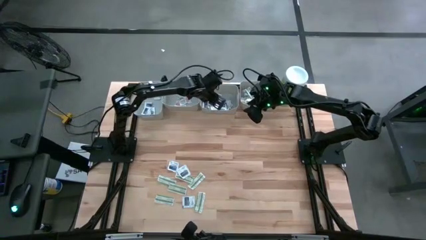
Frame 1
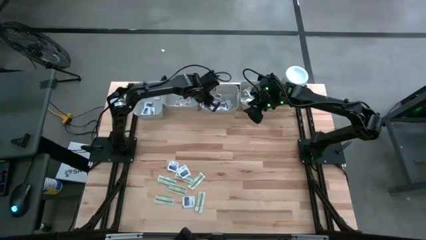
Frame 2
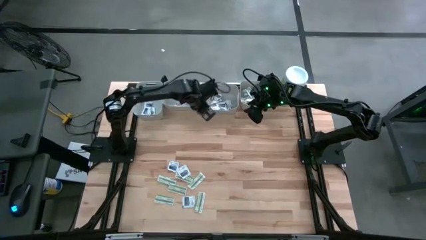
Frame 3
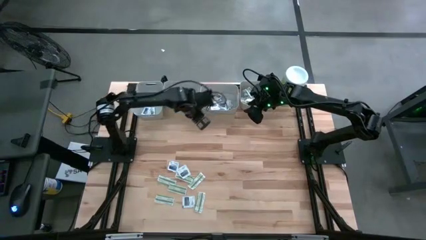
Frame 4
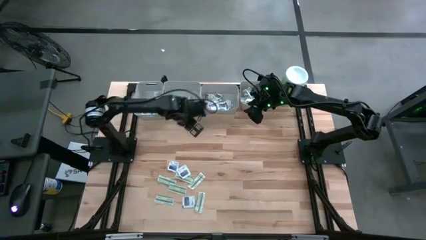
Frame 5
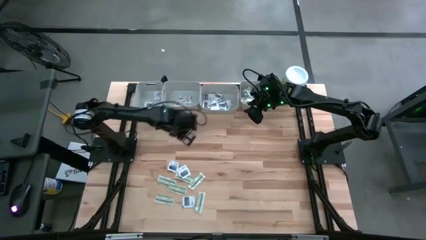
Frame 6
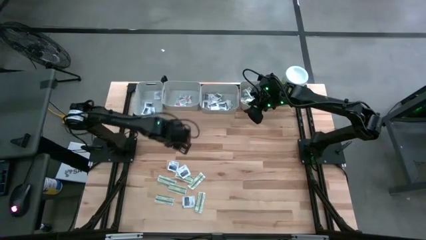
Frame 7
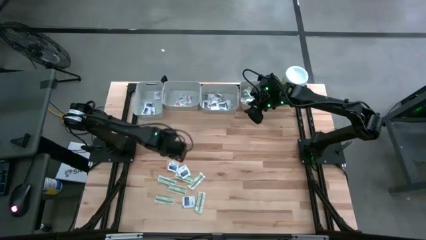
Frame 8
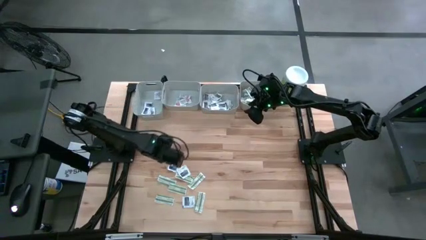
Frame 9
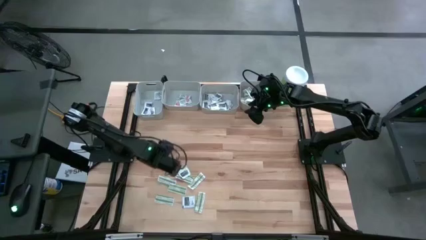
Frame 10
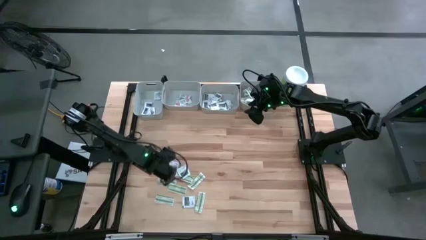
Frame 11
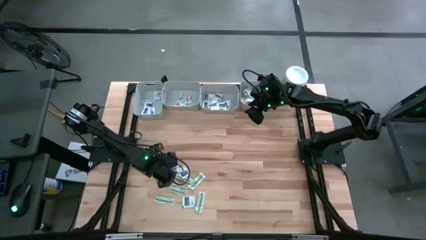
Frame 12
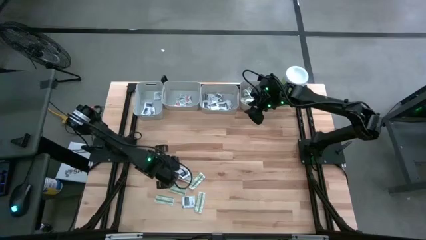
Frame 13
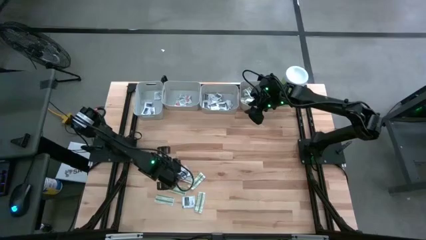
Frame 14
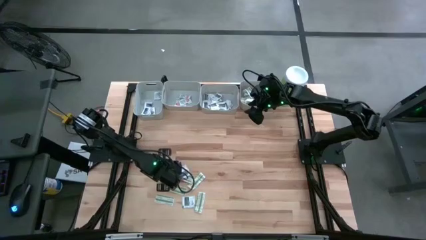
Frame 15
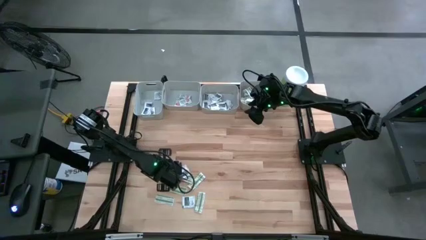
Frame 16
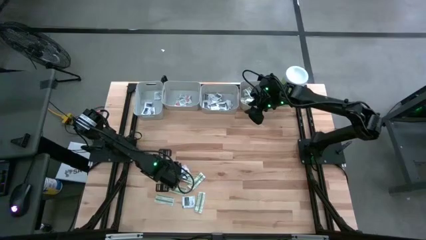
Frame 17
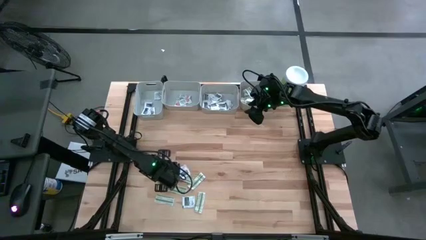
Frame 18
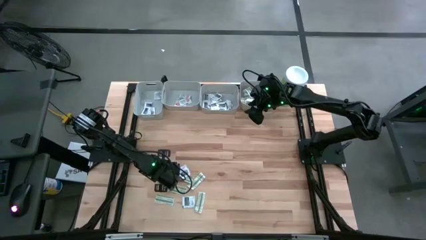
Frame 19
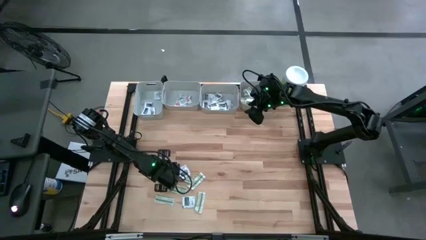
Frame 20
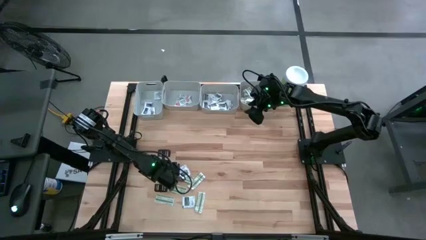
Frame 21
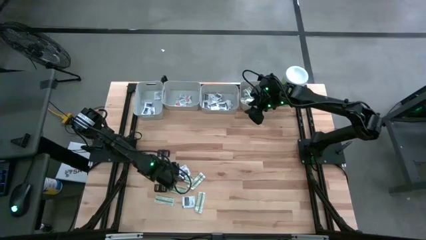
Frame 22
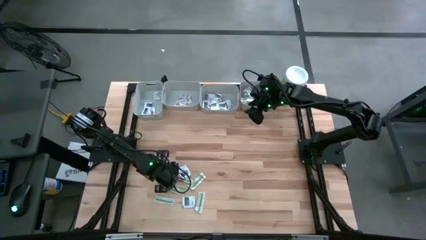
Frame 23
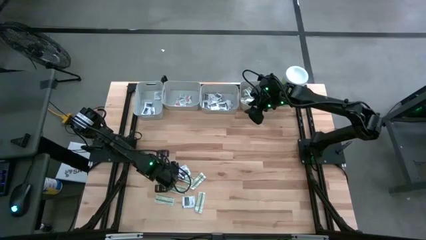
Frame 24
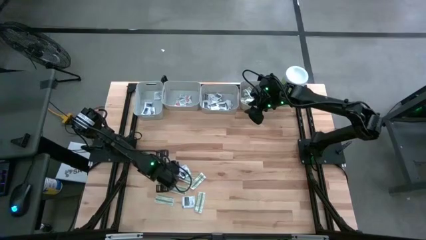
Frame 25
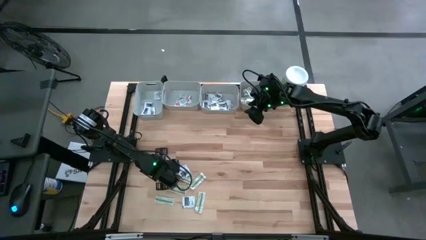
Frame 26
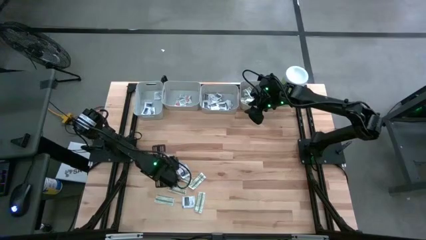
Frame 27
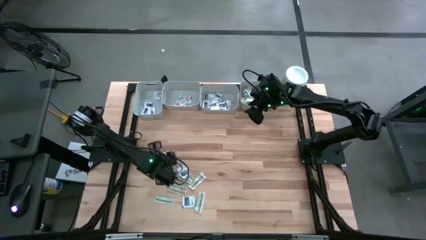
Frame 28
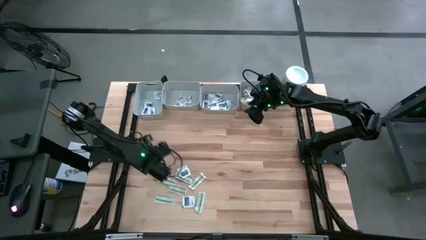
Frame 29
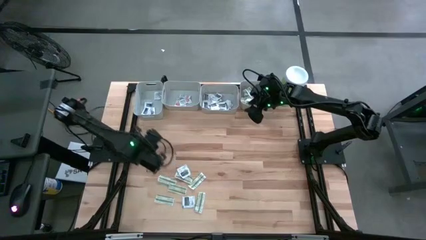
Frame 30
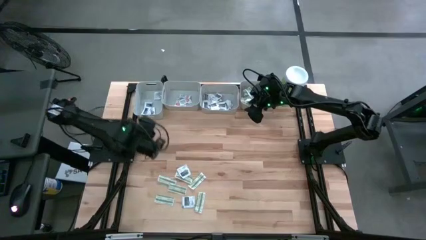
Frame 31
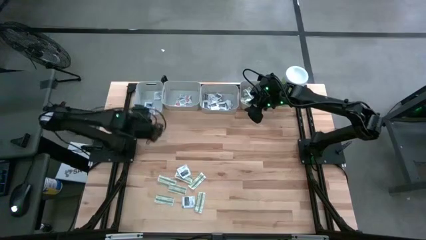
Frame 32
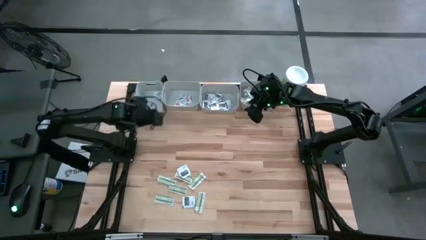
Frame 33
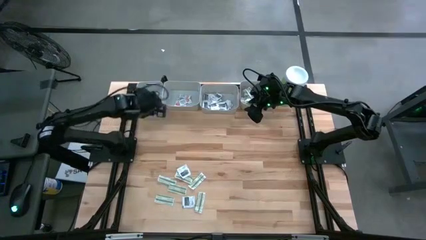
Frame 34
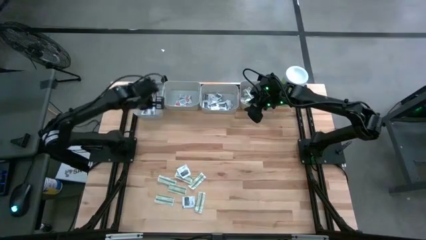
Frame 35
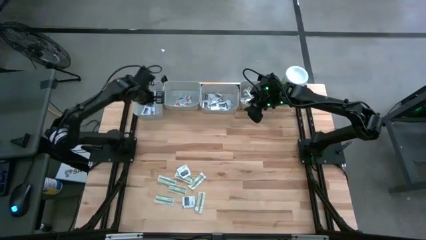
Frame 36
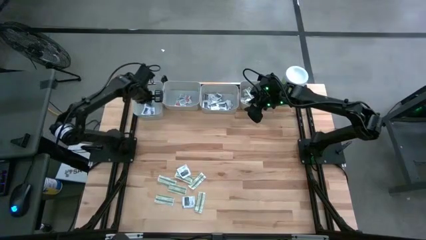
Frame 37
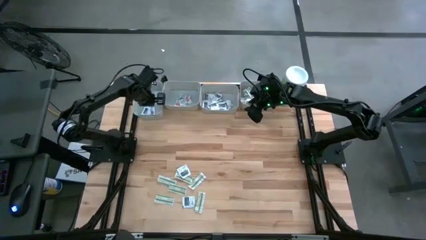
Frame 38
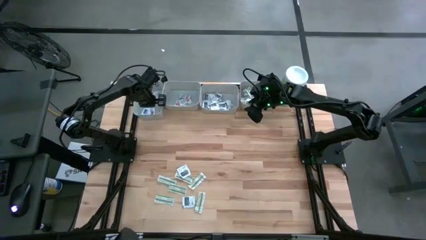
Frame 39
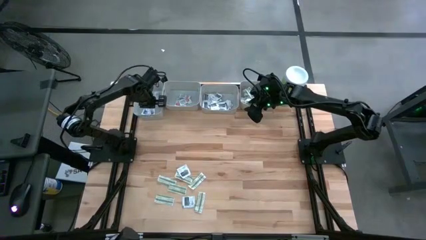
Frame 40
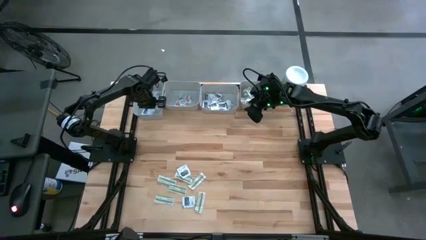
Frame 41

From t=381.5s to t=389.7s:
Task: Pick & Place First Aid Supplies
Put the blue alcohol pad into the left gray bin

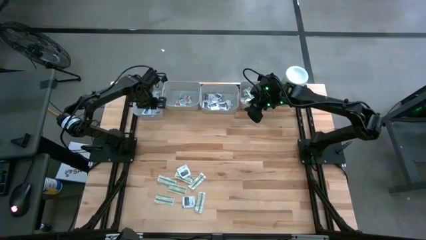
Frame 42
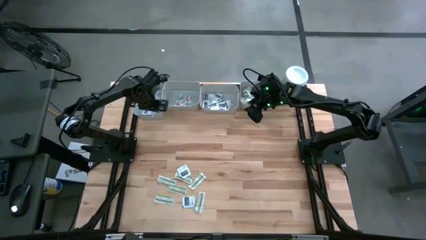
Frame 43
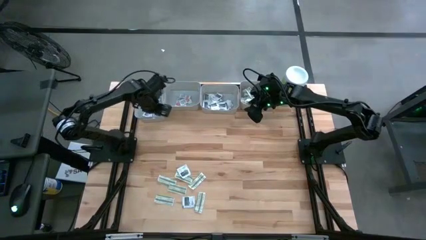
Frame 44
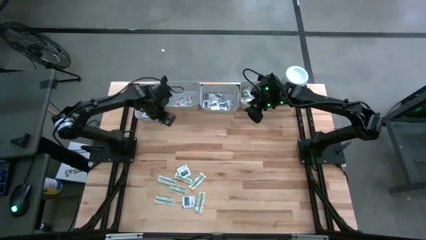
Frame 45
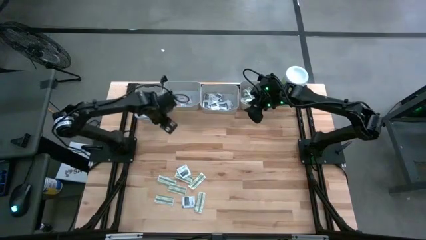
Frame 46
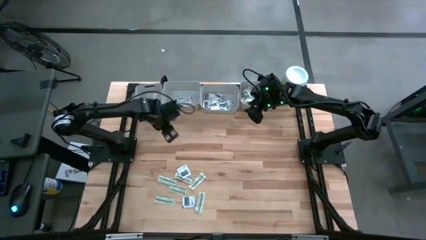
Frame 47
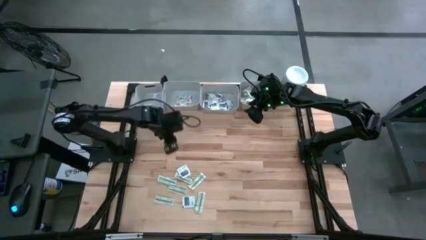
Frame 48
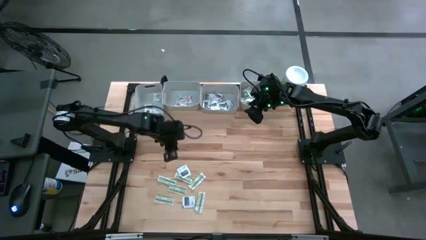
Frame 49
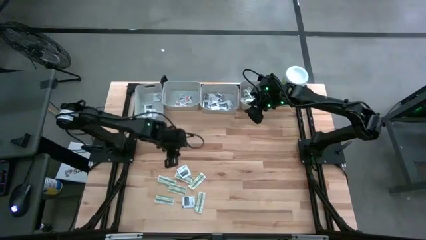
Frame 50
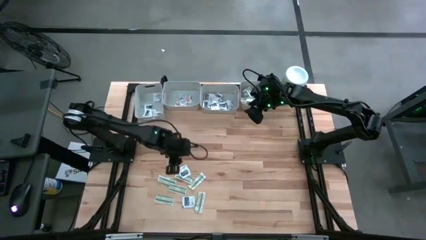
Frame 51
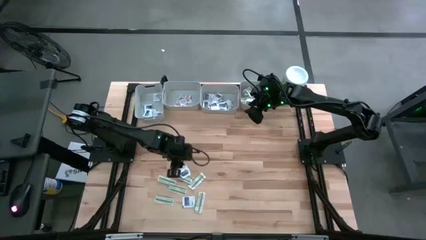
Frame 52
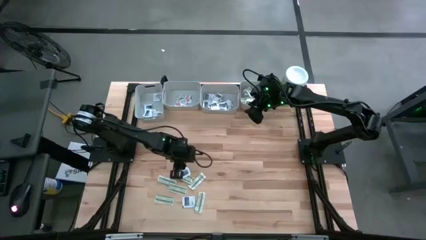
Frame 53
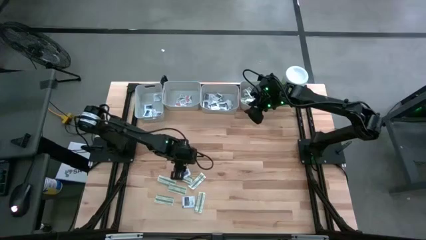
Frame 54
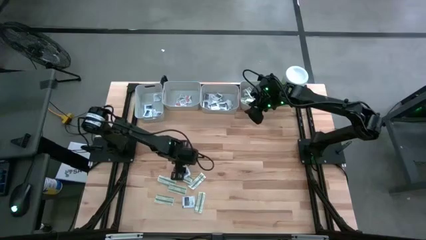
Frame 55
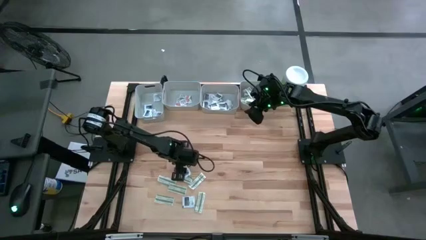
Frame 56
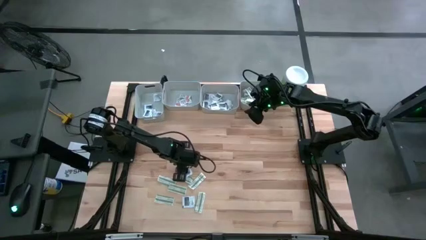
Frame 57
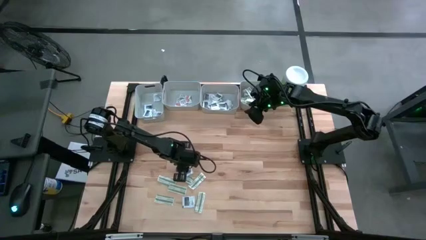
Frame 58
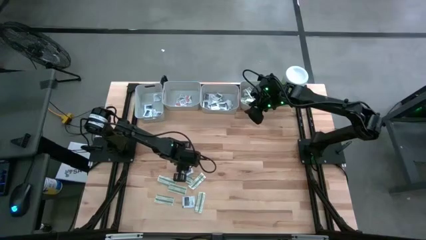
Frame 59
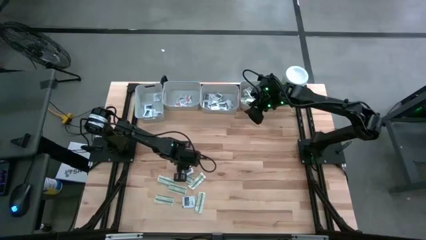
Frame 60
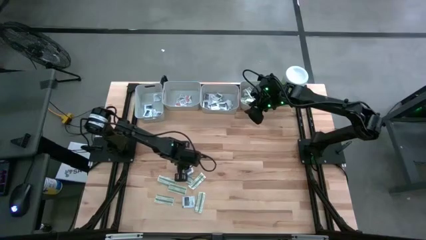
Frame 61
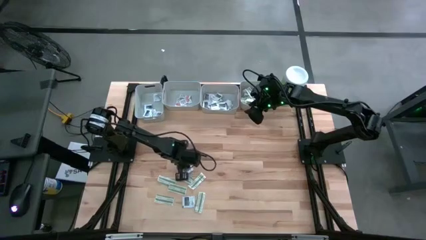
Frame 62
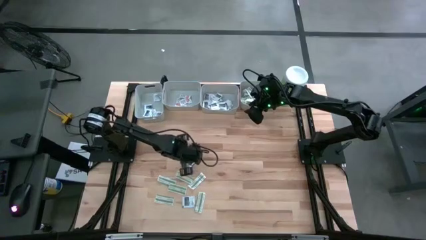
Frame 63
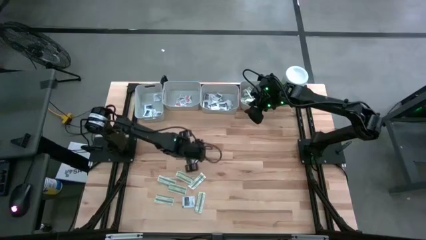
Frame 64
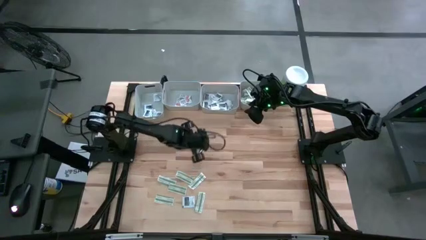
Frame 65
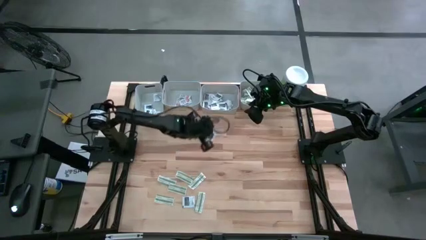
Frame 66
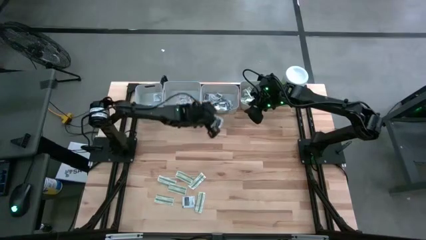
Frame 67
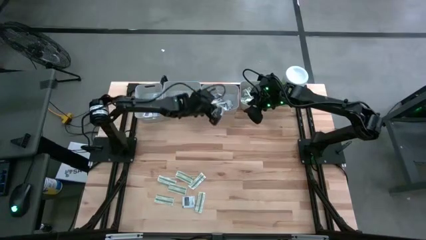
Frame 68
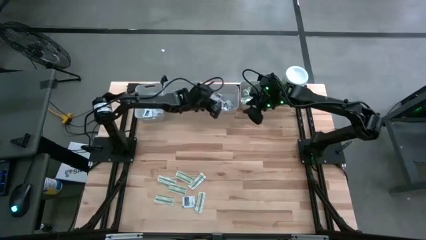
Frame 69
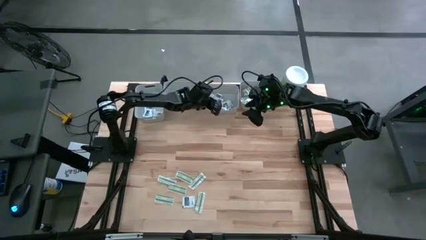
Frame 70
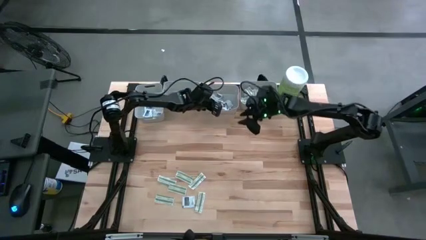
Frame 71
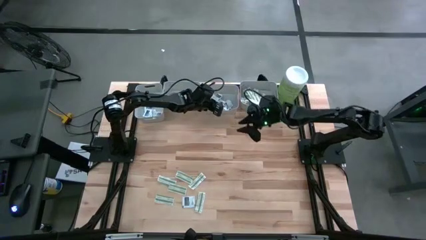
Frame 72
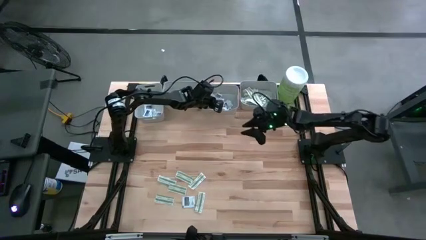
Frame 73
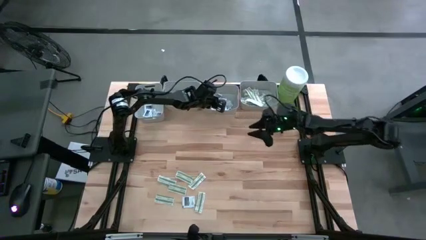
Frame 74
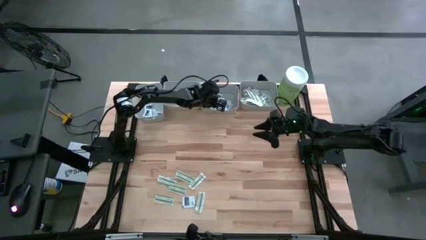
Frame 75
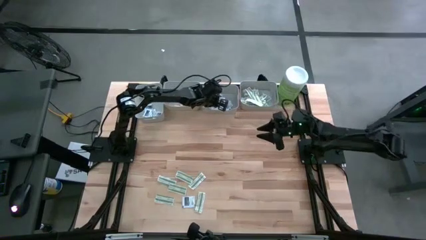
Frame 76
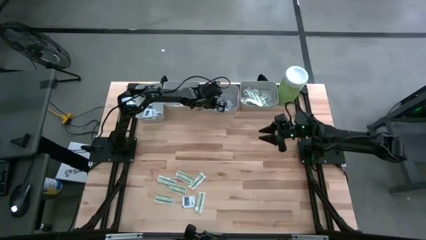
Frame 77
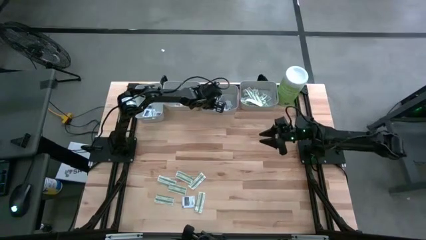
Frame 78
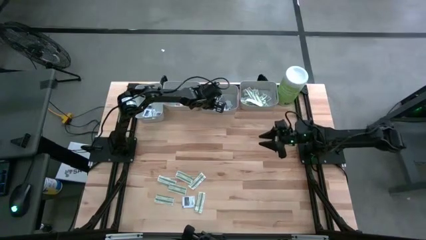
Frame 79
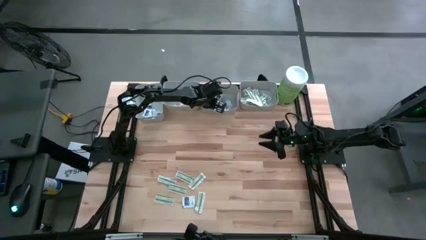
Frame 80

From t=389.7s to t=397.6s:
Put the gray towelette pack into the middle right gray bin
